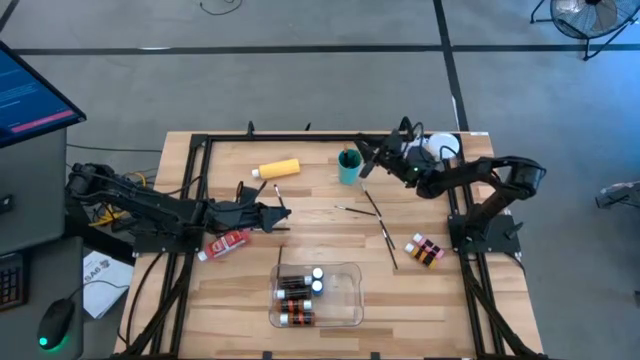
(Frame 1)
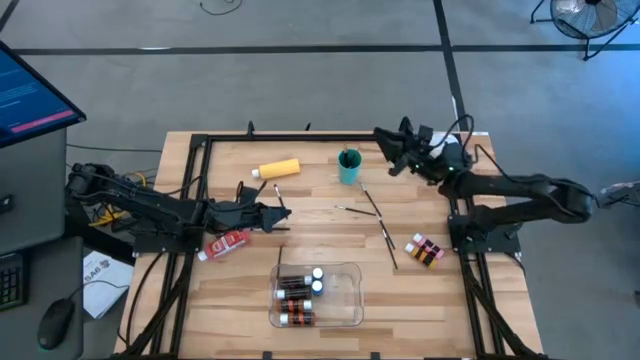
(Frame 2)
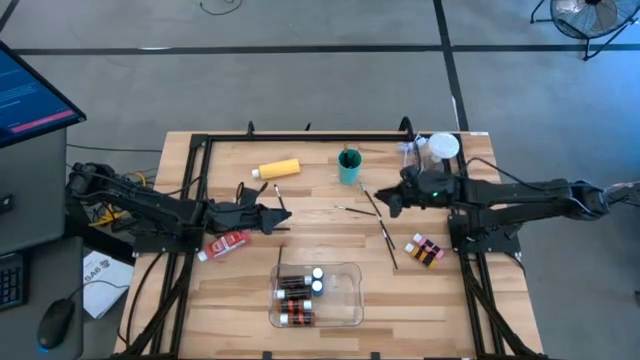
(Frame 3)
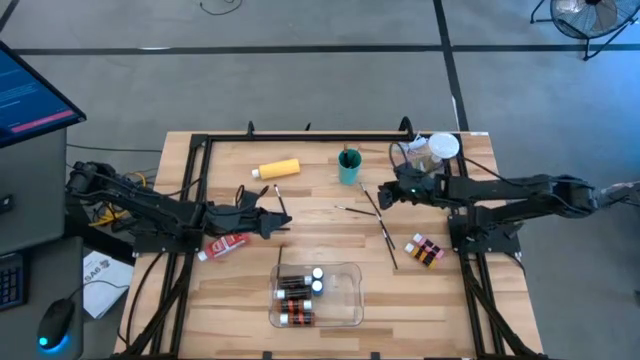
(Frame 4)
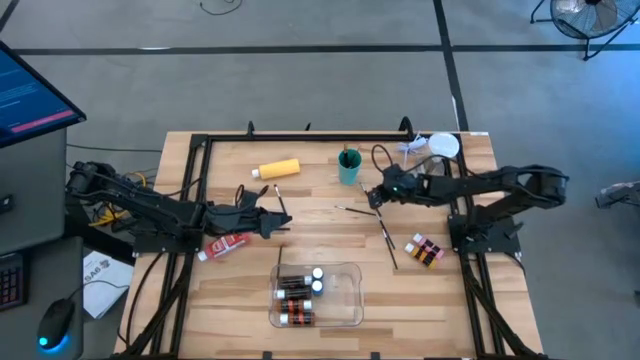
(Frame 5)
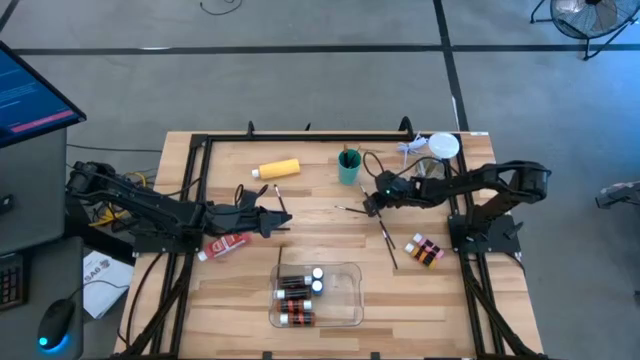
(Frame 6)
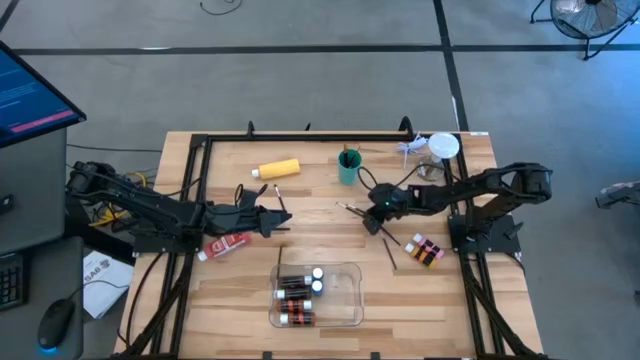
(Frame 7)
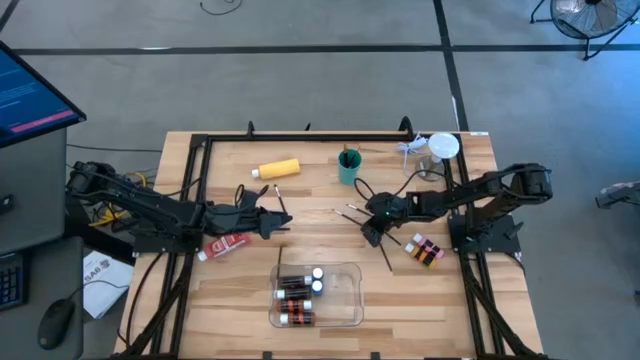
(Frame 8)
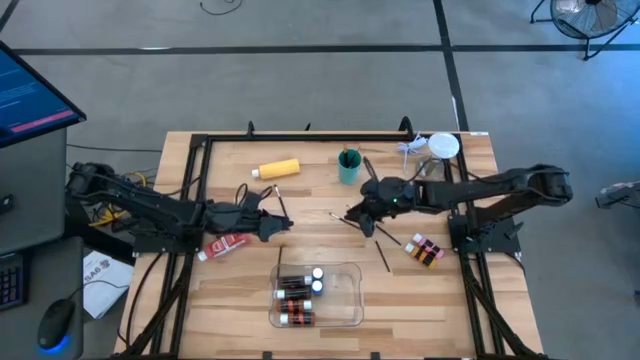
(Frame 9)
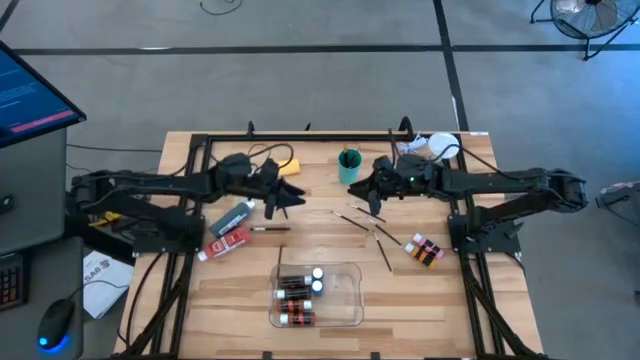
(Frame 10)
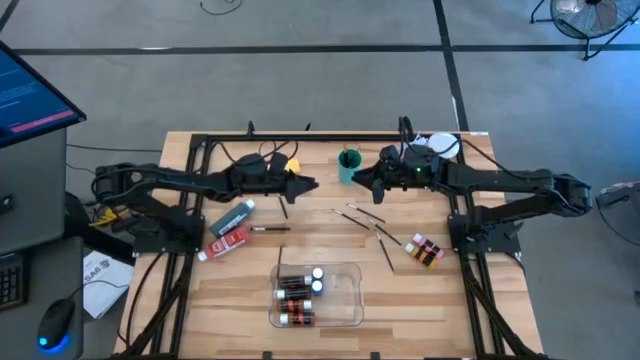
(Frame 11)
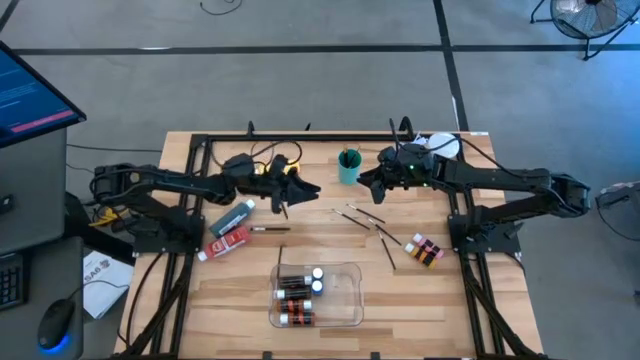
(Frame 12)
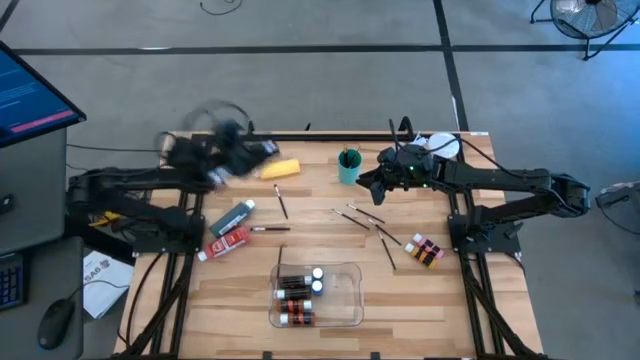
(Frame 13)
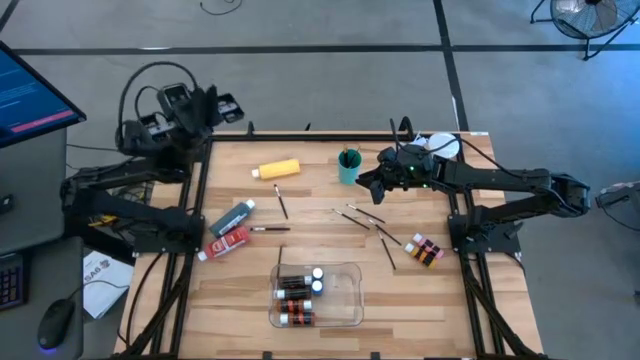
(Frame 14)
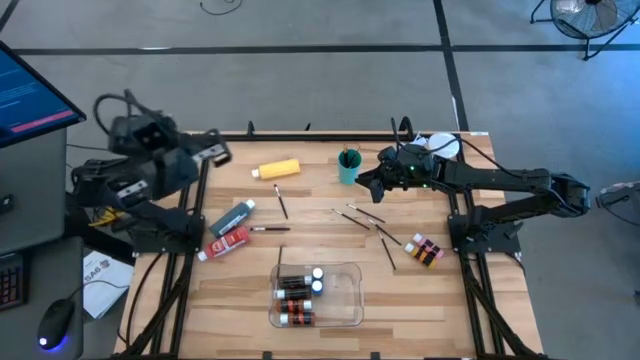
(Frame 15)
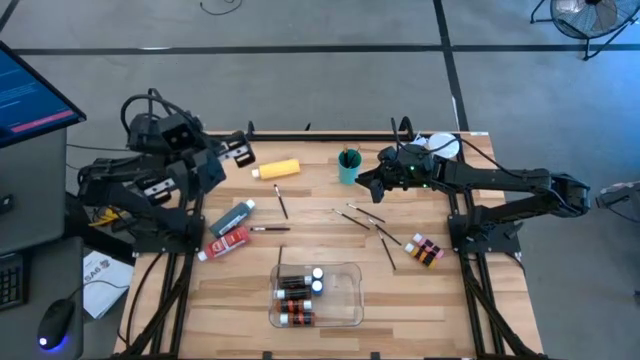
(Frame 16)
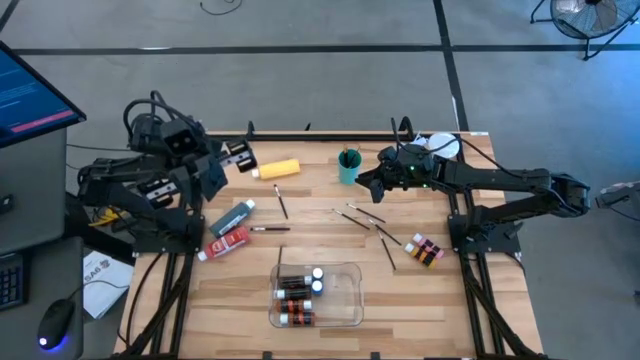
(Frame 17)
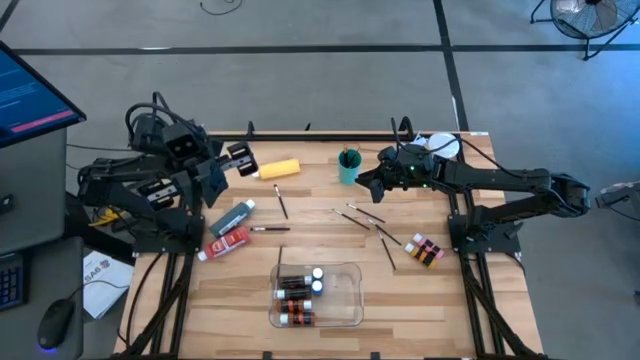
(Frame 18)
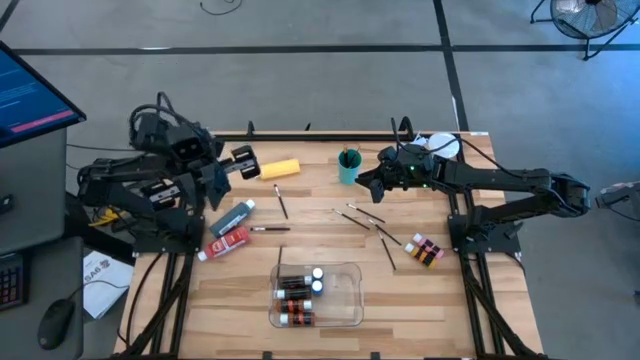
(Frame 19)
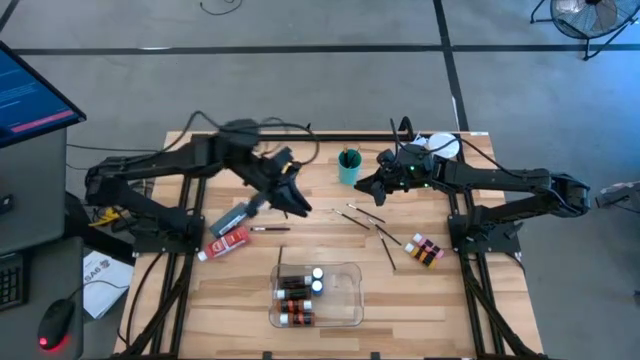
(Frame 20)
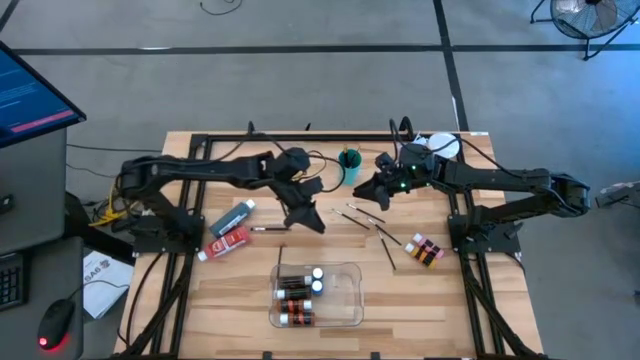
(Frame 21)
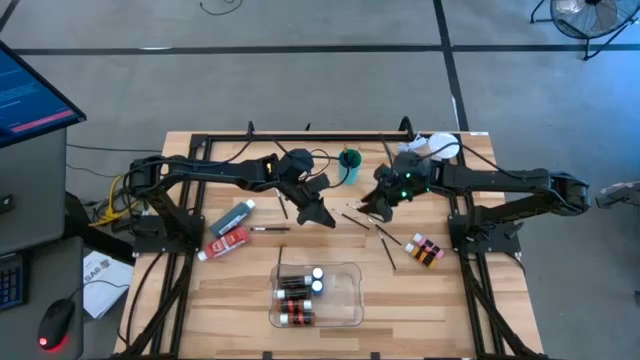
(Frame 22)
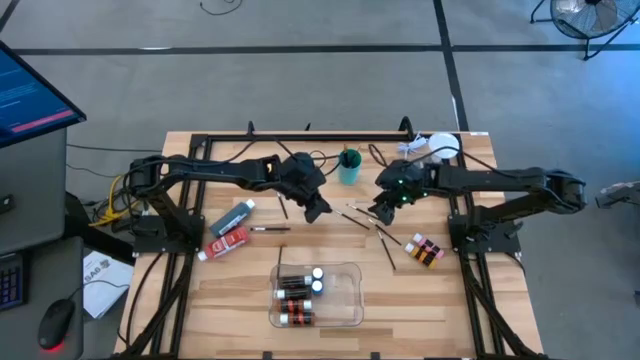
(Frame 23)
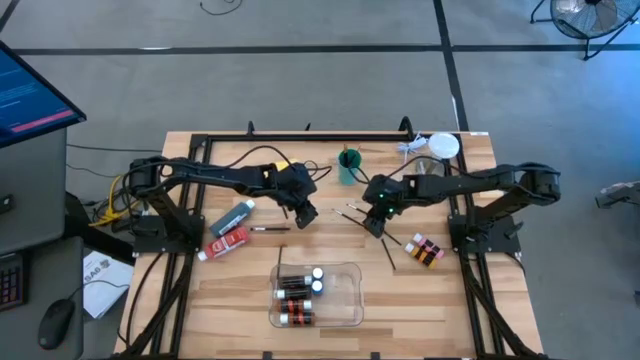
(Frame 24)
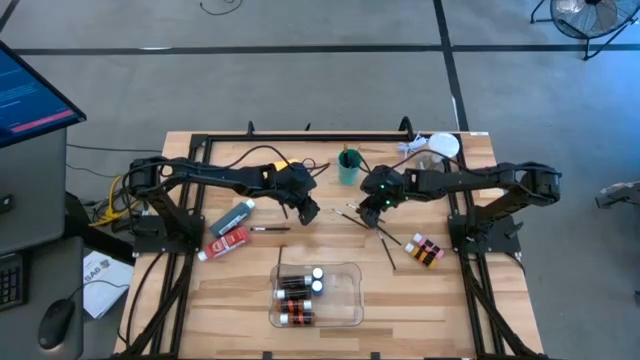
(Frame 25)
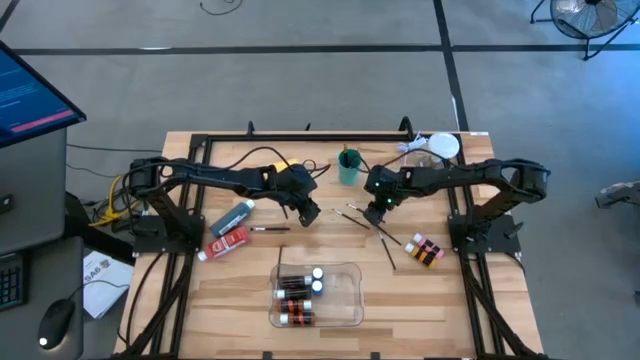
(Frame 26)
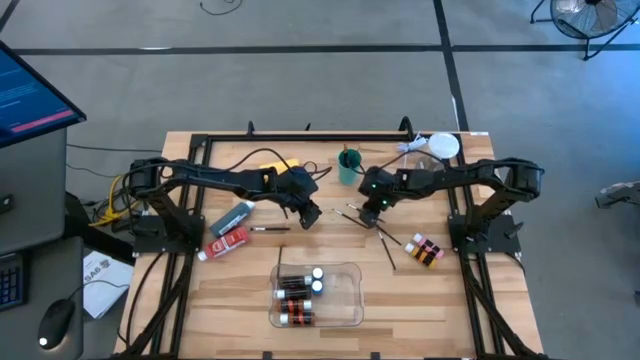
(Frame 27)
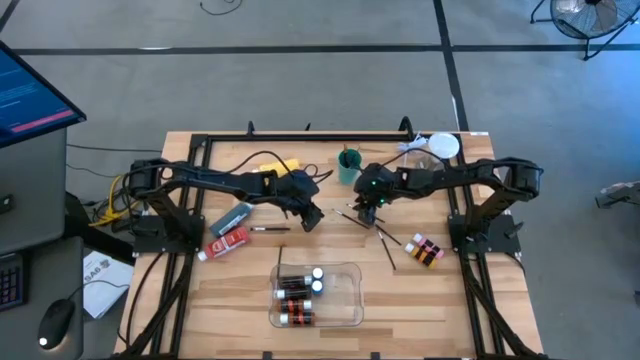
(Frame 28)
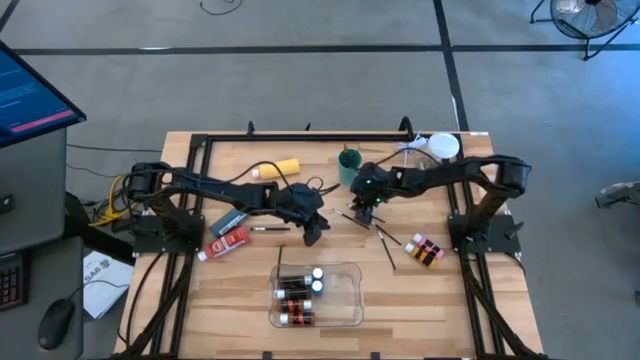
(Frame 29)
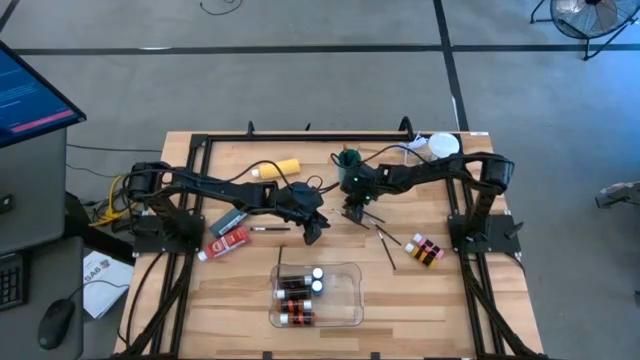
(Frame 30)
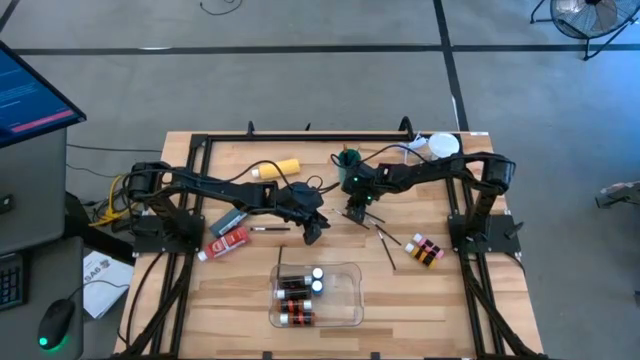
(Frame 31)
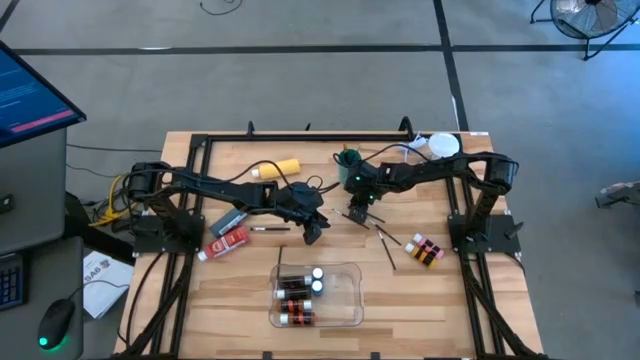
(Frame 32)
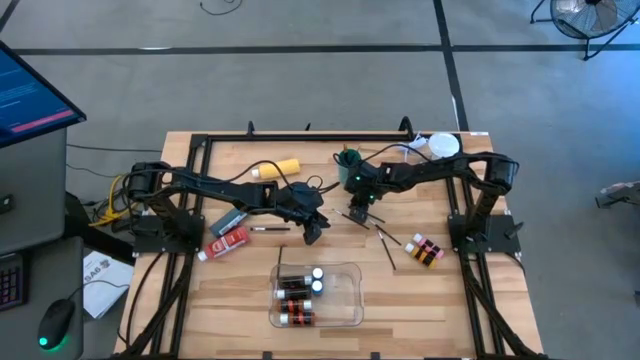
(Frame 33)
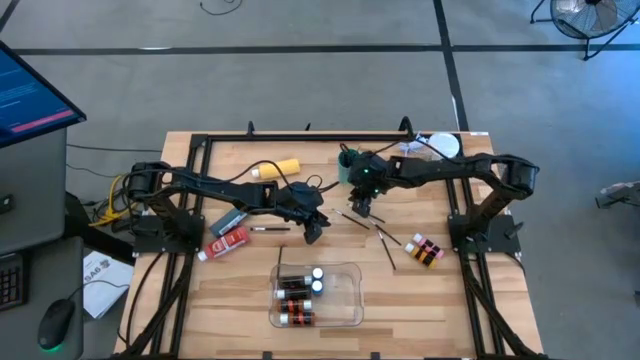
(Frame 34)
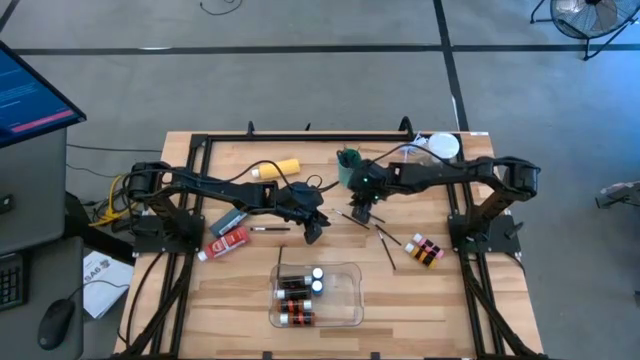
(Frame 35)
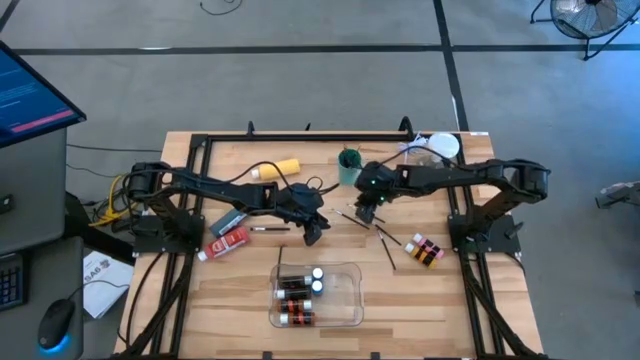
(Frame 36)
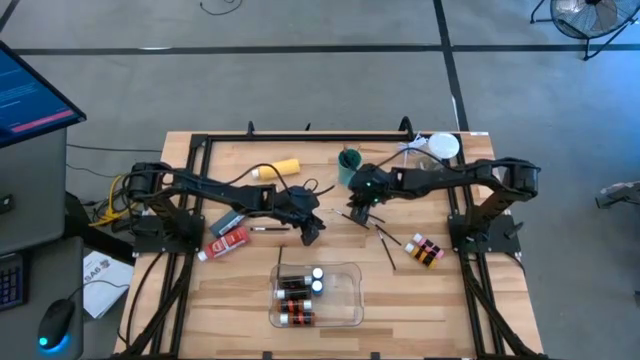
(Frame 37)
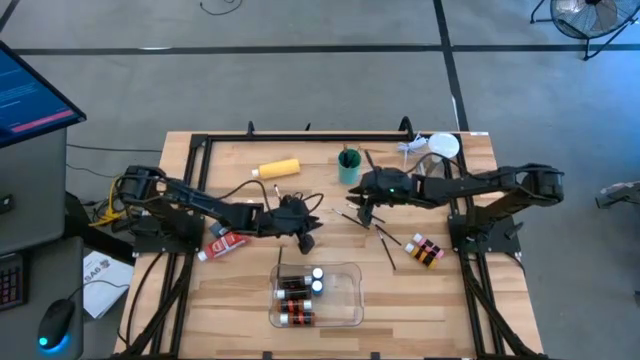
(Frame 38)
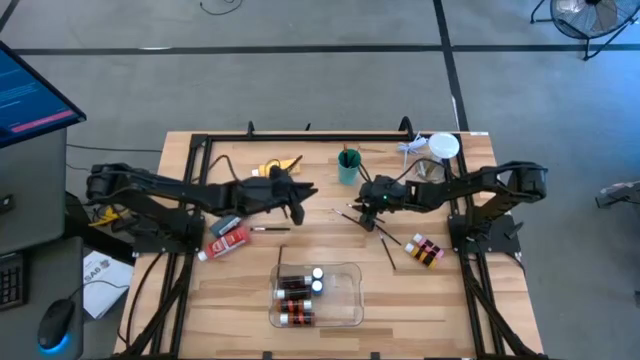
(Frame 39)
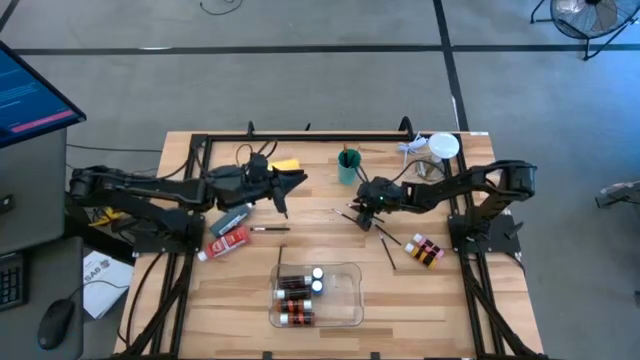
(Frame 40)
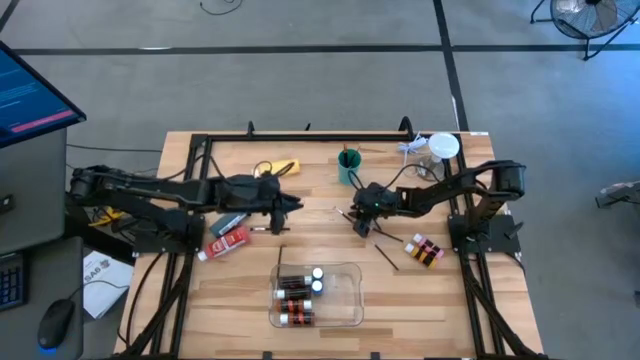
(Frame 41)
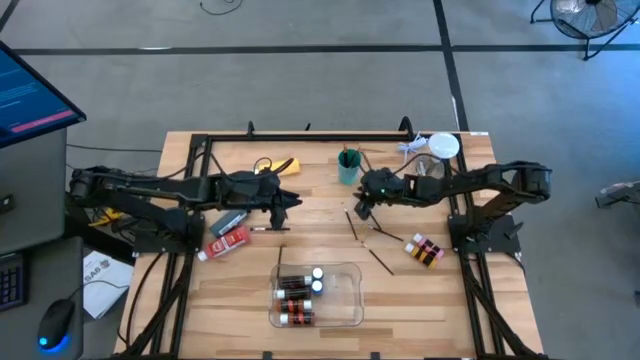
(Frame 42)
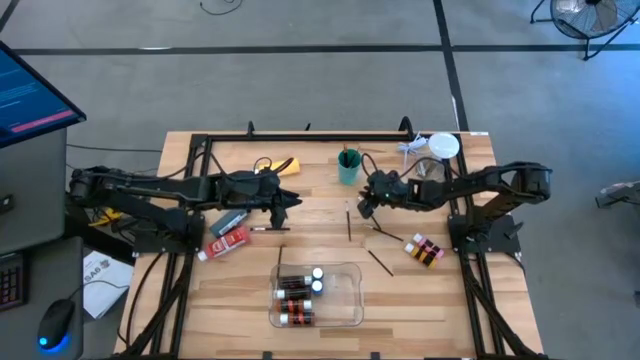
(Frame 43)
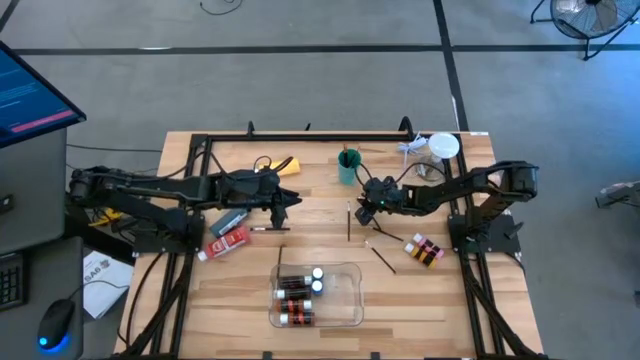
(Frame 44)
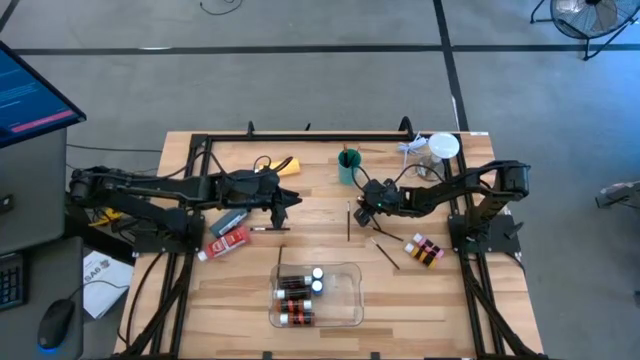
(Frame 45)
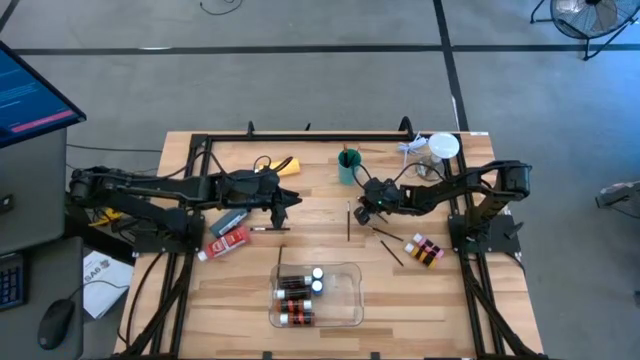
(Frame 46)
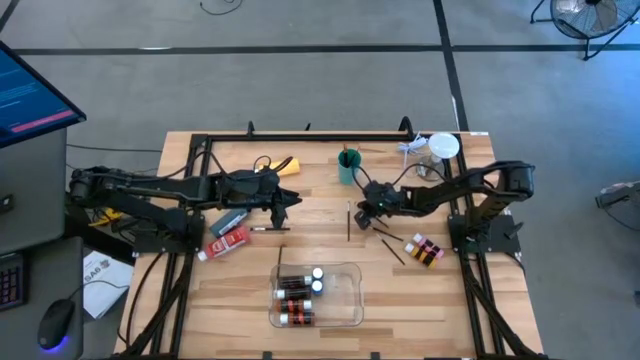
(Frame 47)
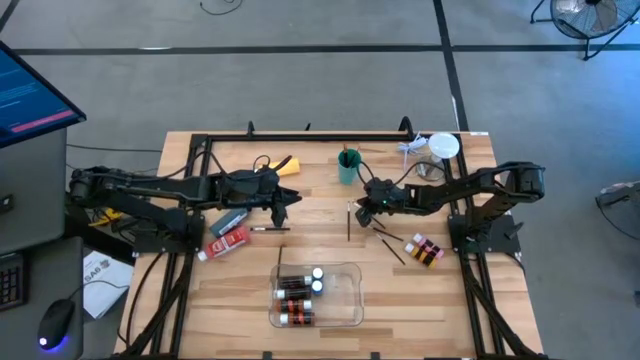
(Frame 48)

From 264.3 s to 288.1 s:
Task: Pick & Place Paint Supplies
Put the silver paint brush into the green cup
